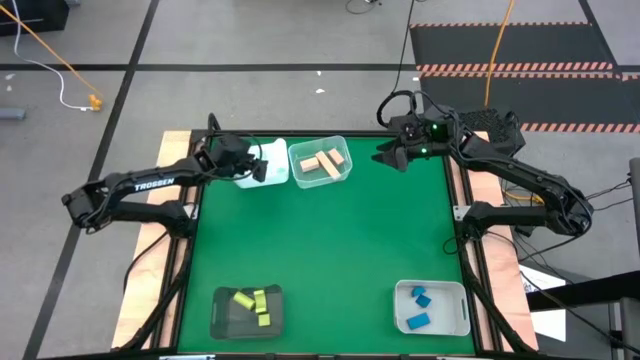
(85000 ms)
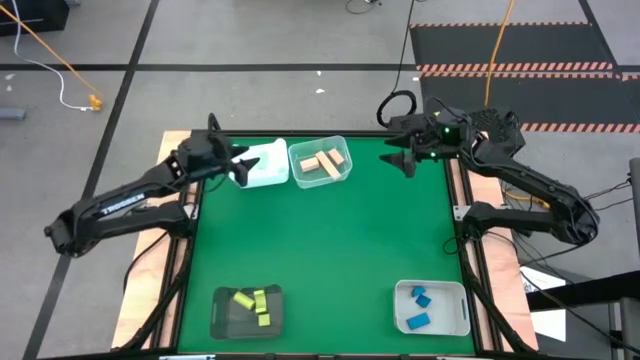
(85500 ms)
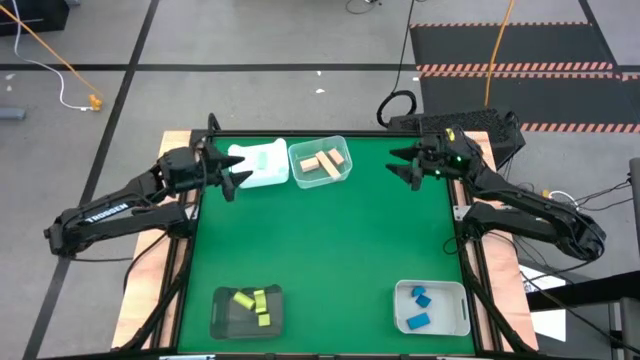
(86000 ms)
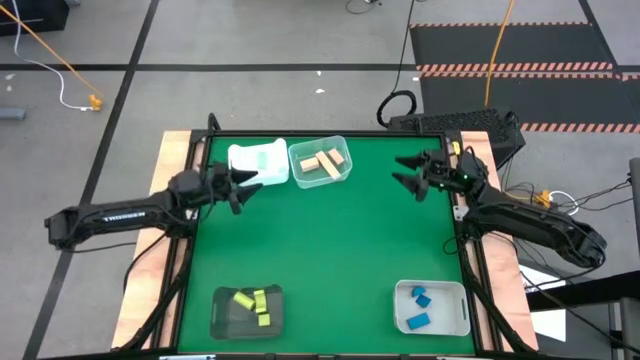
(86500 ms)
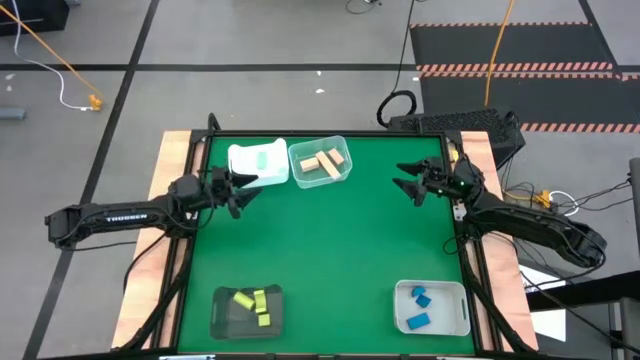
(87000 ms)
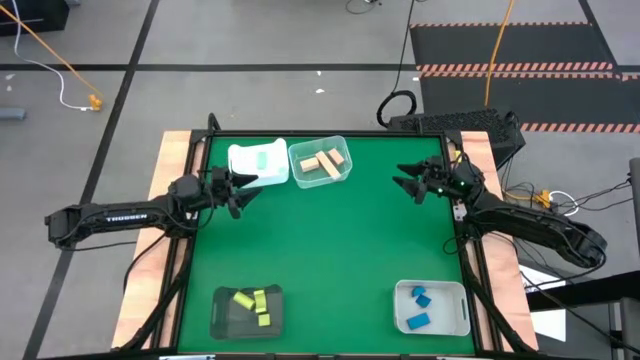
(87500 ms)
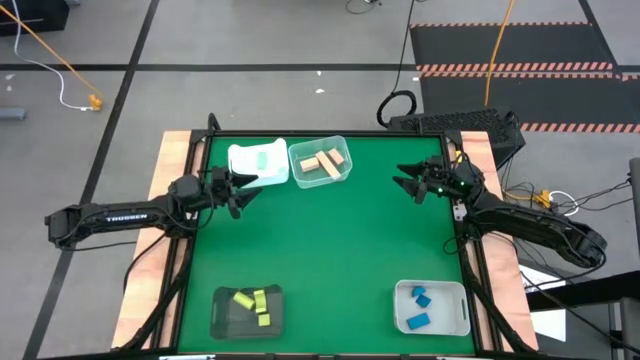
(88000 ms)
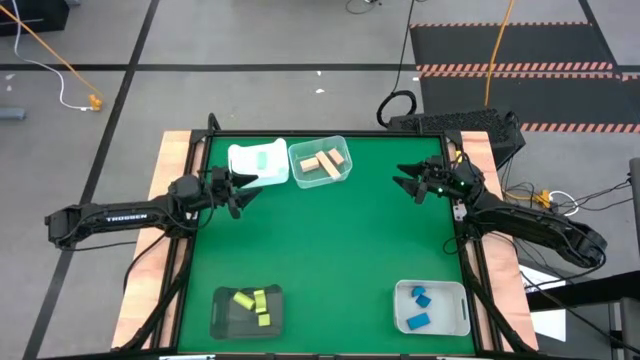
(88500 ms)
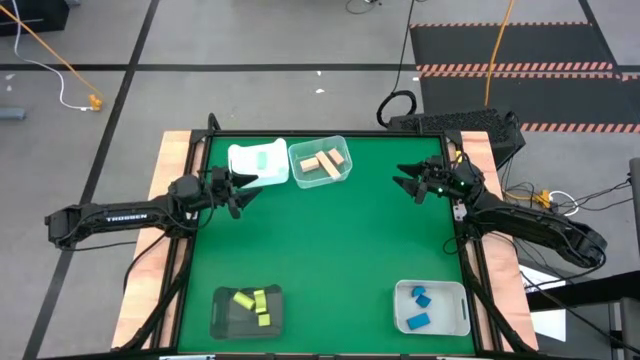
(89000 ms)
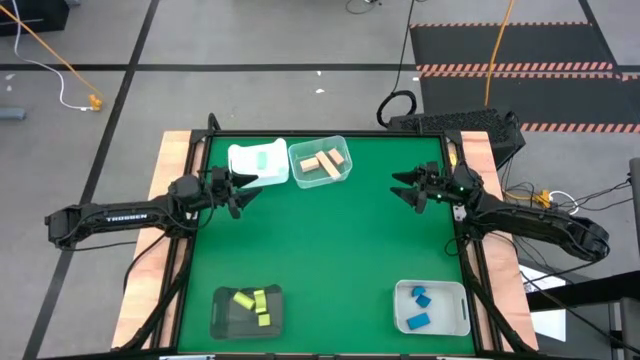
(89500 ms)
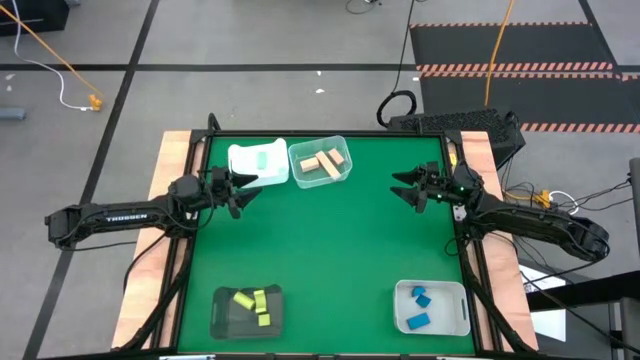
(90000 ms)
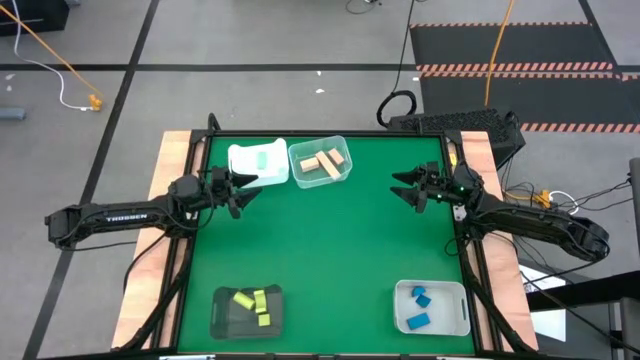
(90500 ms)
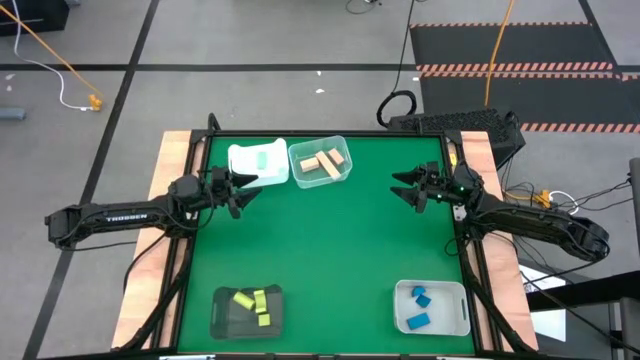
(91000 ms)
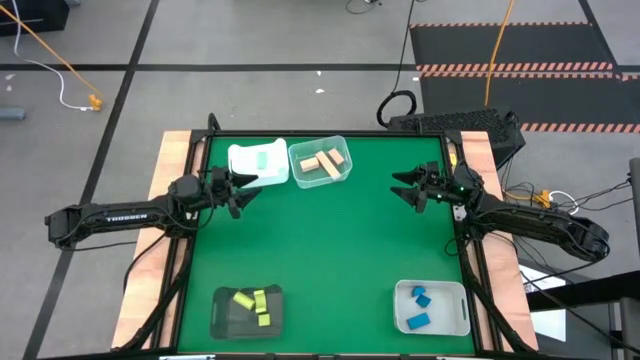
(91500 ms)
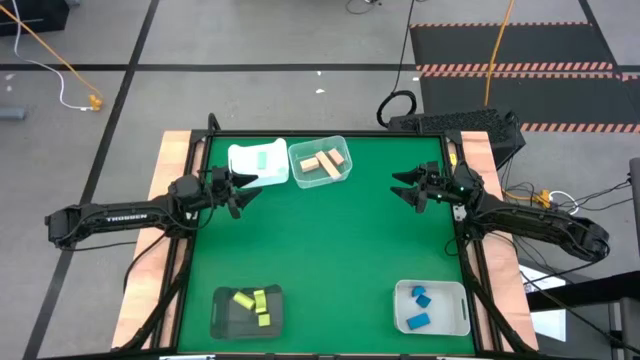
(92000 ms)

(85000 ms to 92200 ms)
Task: Sort & place blocks by color
Return to Home Position

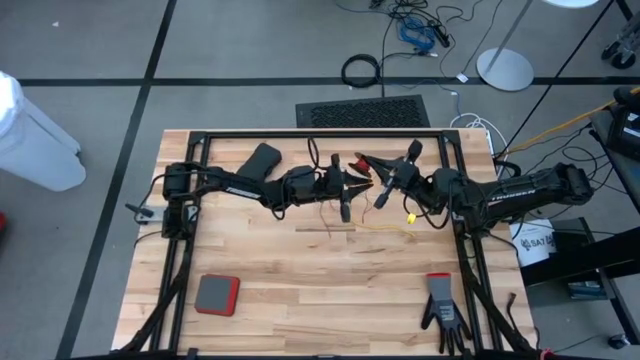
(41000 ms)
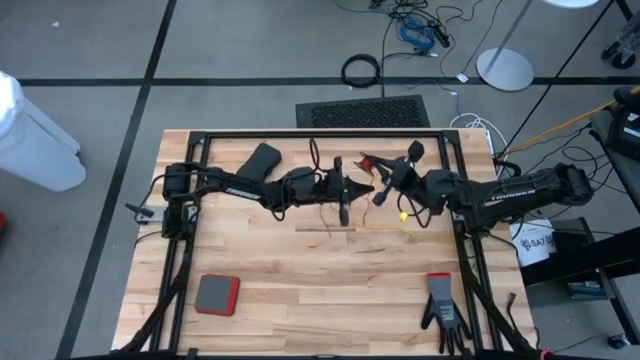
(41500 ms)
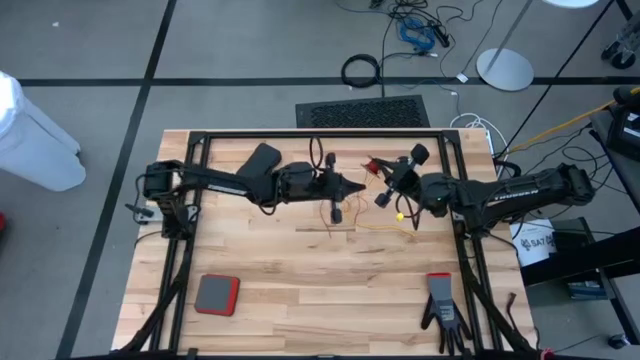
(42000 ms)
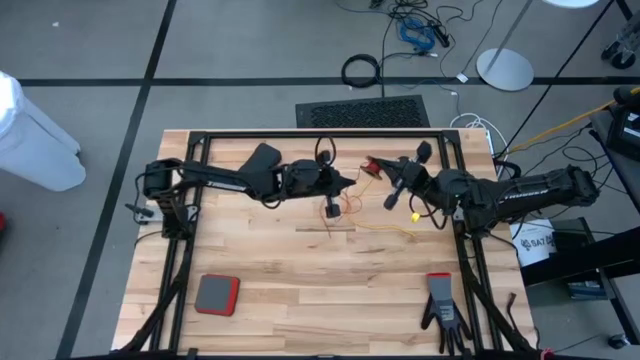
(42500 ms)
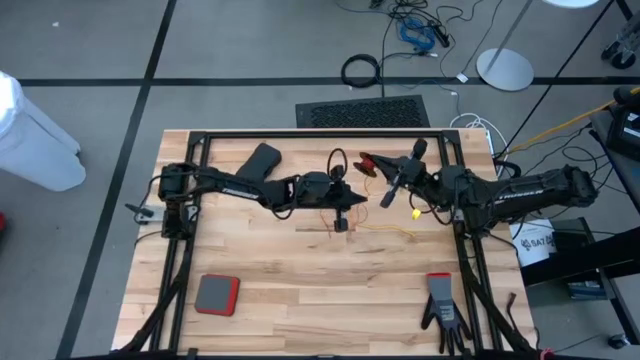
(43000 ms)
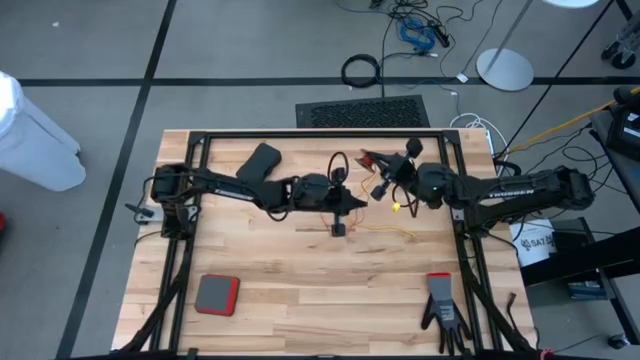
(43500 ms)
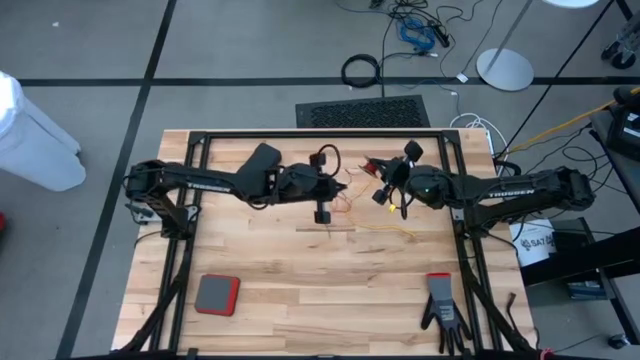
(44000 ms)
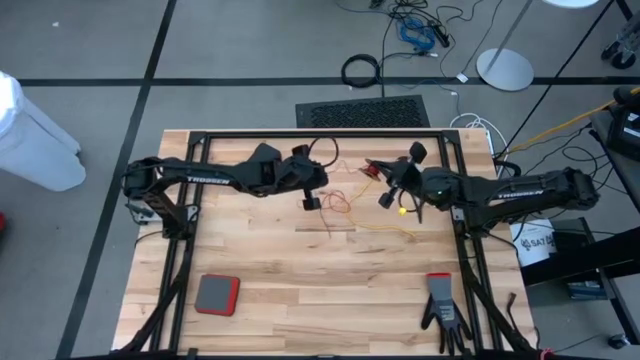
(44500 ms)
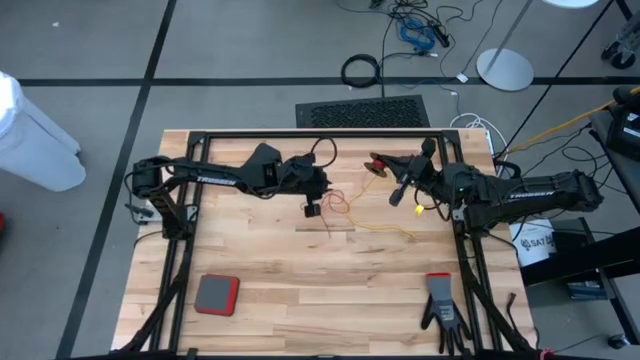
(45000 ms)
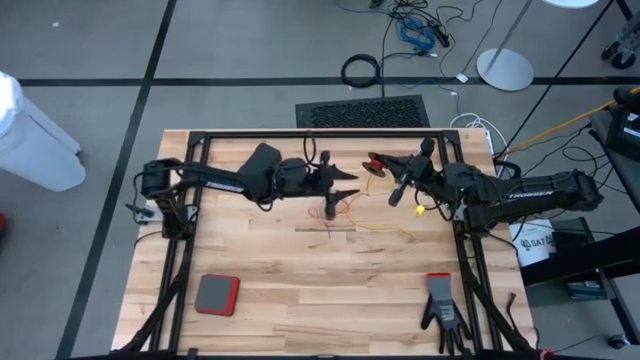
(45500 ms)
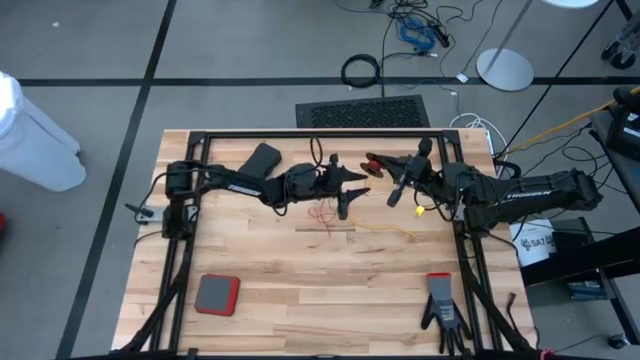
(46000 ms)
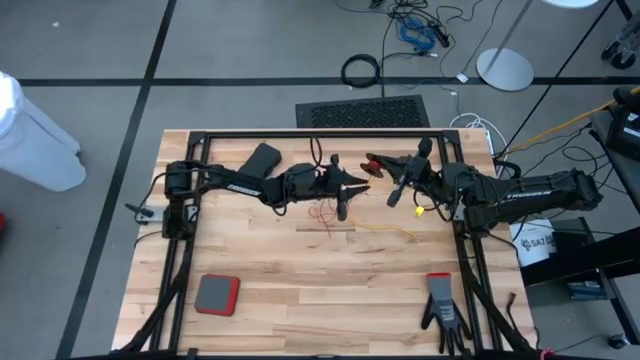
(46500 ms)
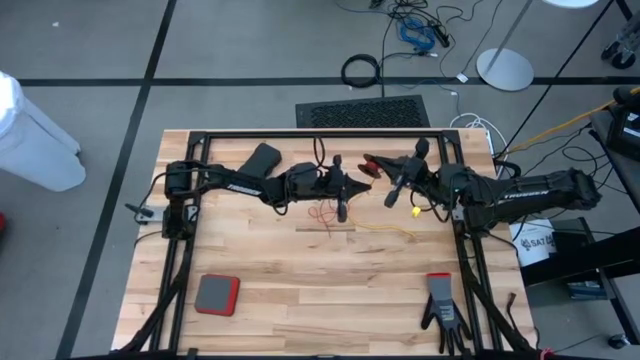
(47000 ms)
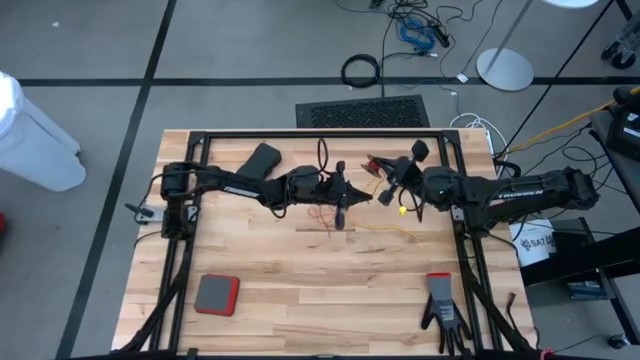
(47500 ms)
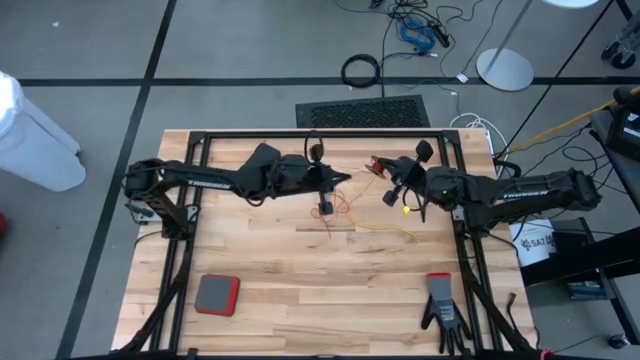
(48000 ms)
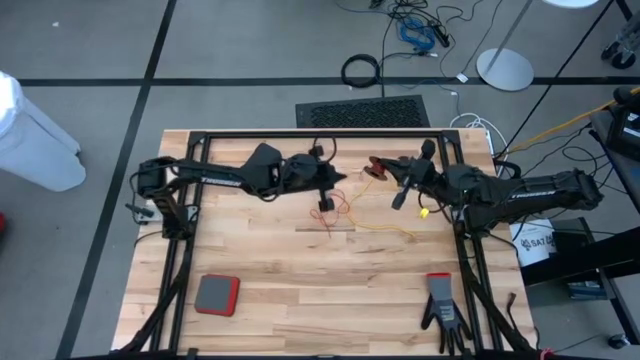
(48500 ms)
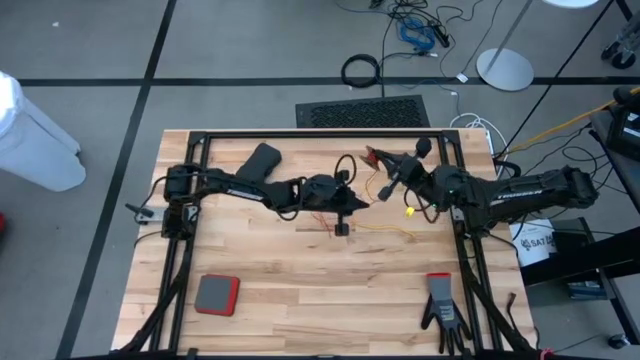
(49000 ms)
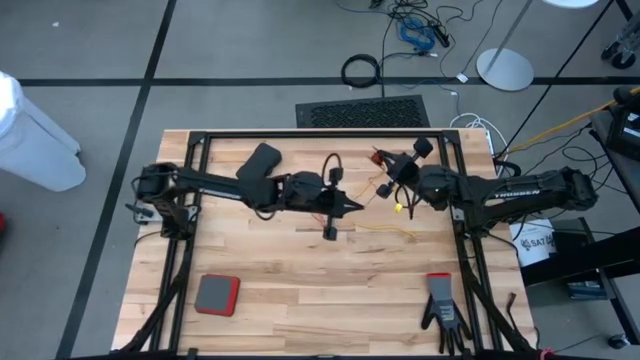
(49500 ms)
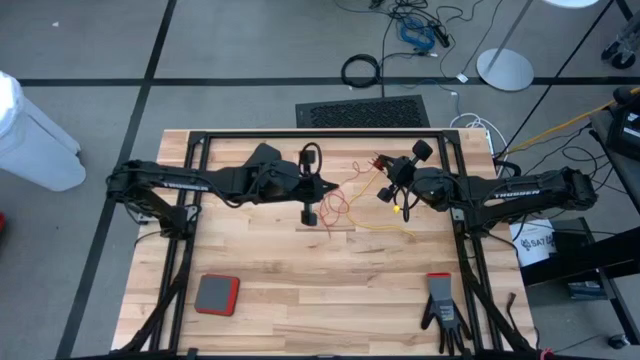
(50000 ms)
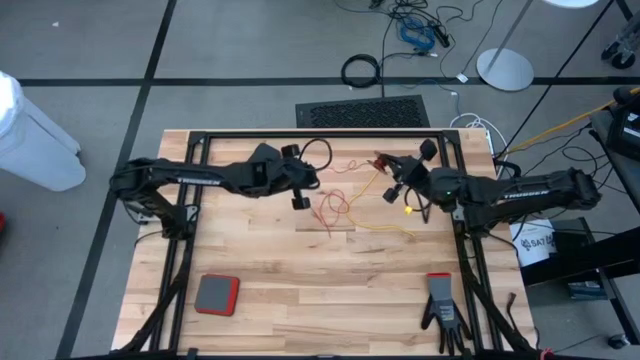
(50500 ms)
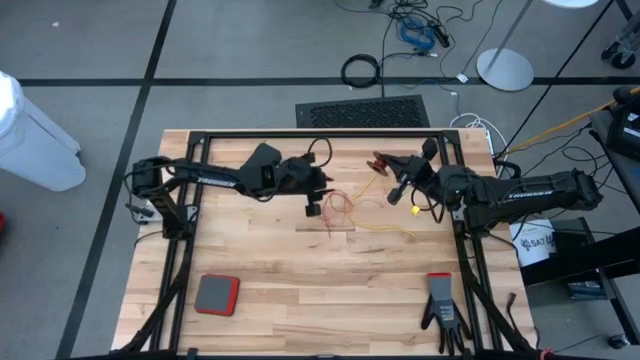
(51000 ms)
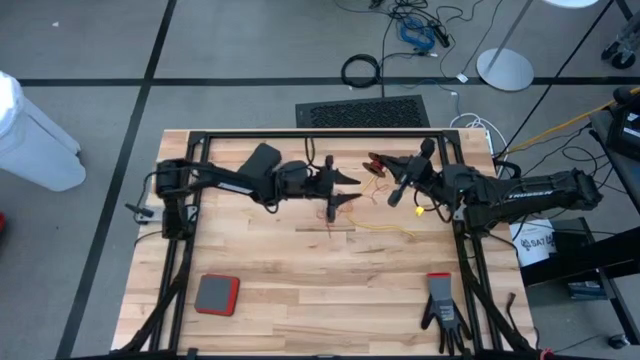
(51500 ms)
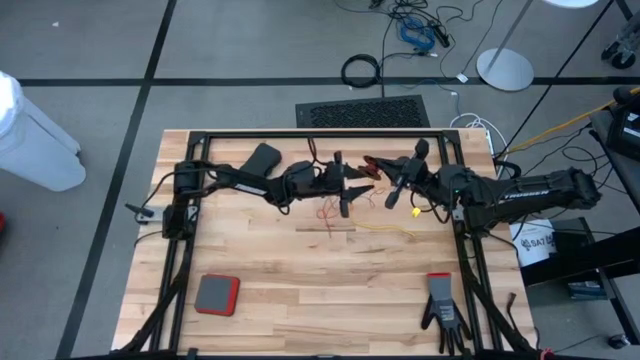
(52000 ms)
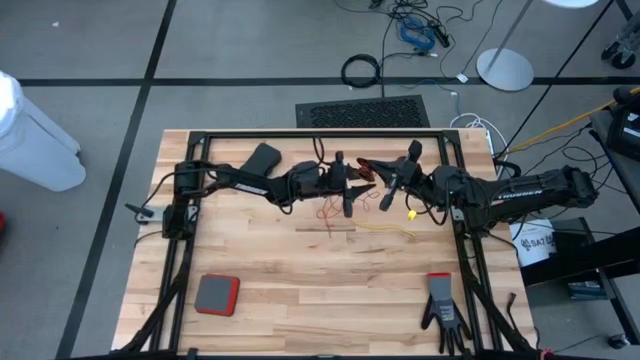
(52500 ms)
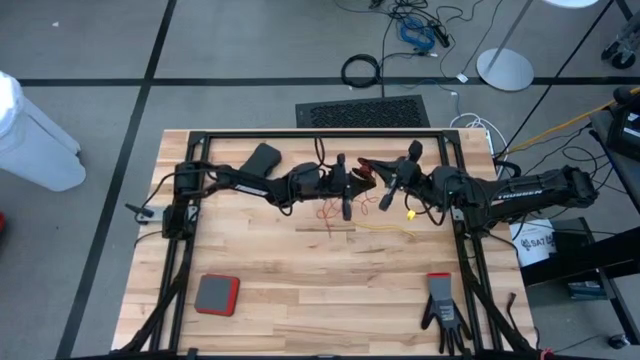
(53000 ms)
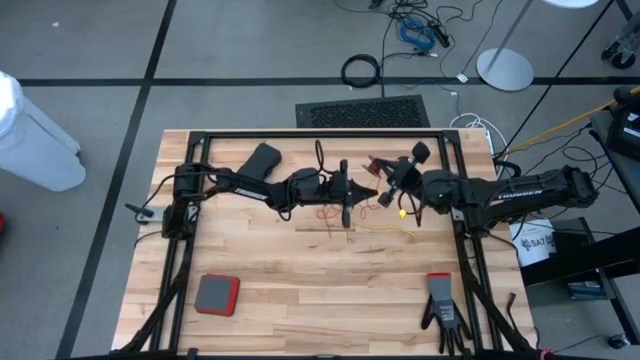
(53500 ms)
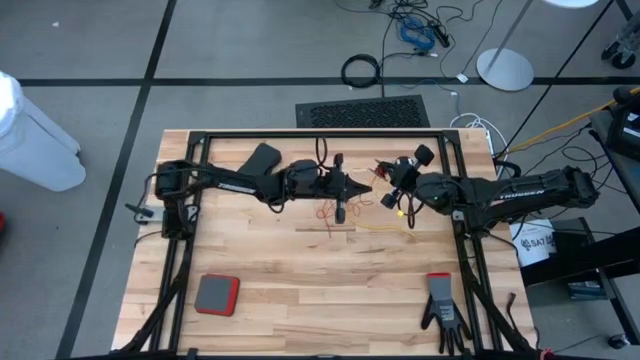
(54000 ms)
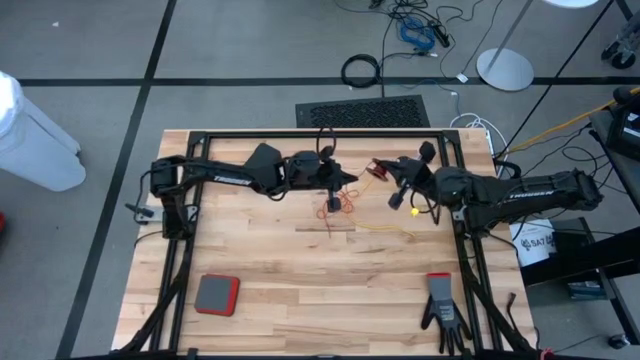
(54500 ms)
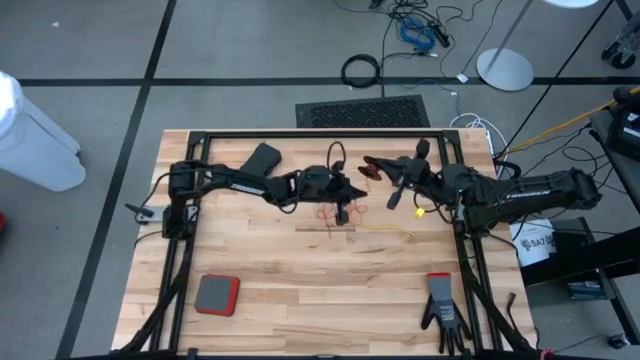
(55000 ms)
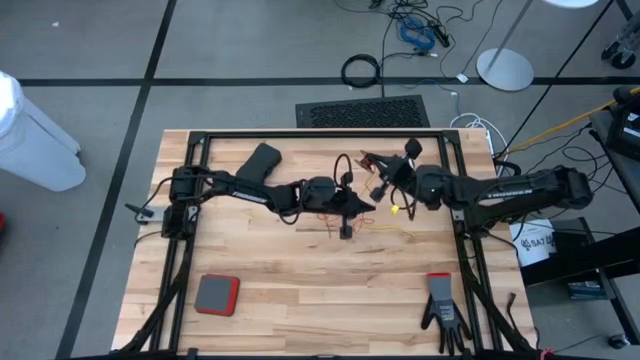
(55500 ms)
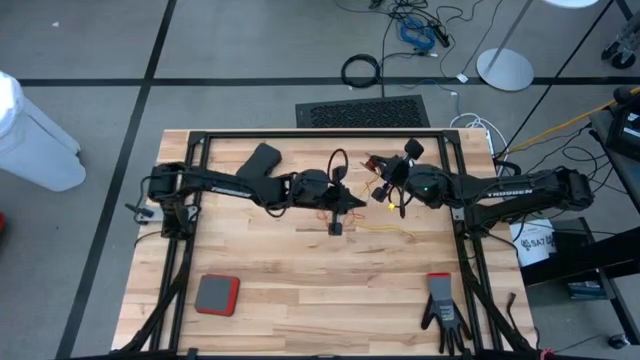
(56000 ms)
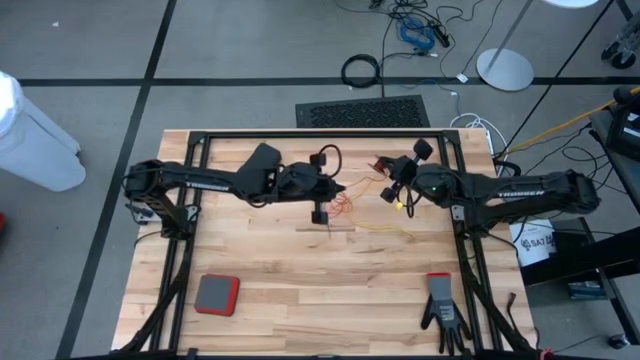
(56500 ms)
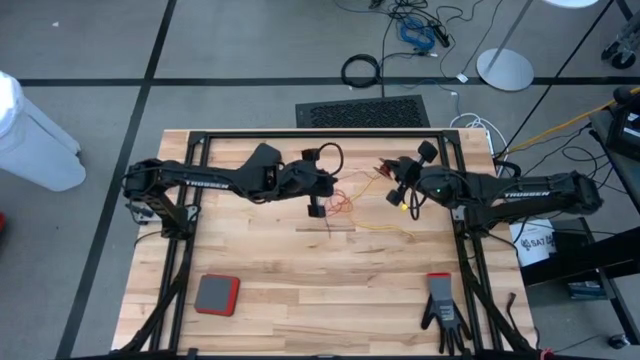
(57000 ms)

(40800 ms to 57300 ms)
Task: Coil cords
Uncoil the red wire from the spool
